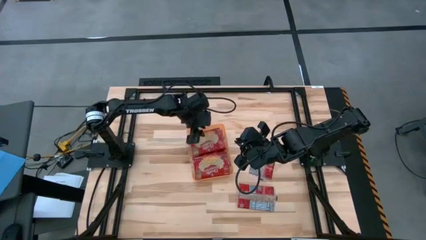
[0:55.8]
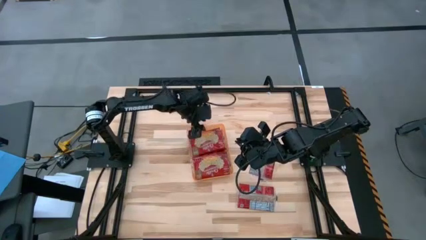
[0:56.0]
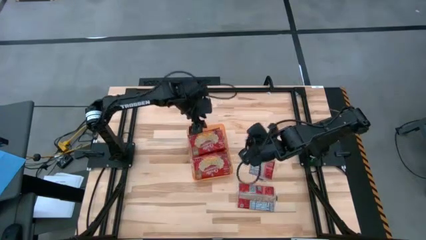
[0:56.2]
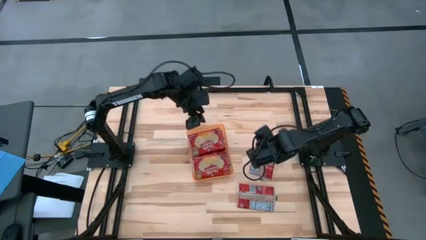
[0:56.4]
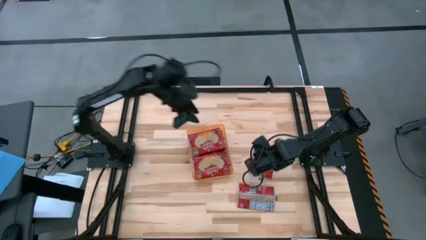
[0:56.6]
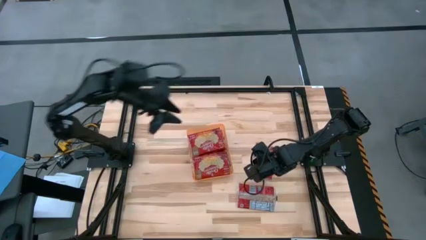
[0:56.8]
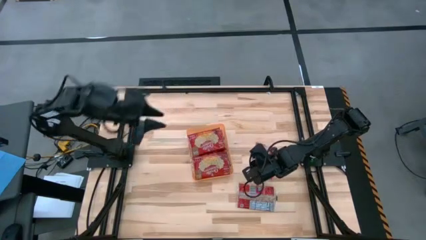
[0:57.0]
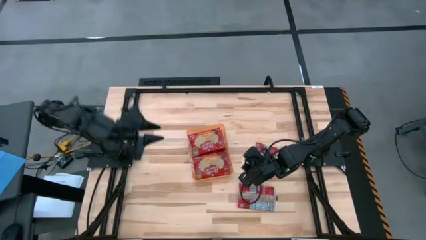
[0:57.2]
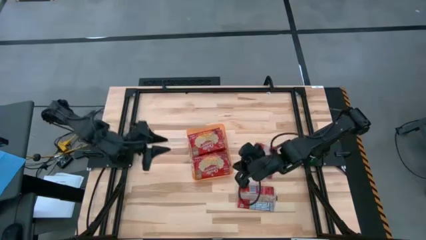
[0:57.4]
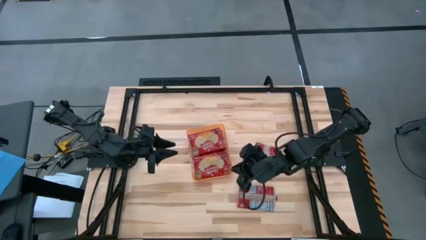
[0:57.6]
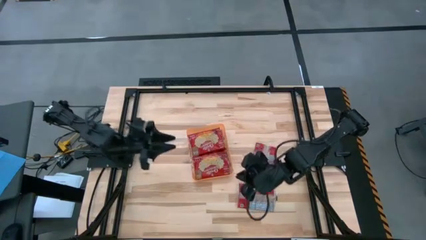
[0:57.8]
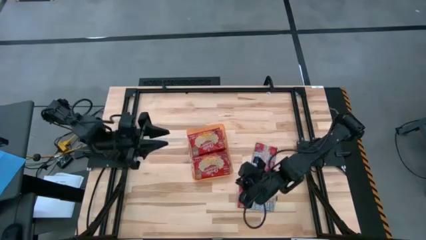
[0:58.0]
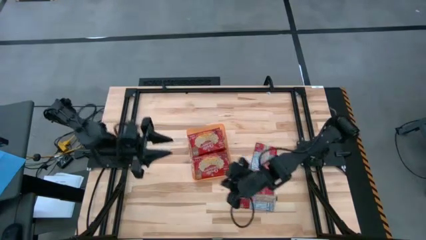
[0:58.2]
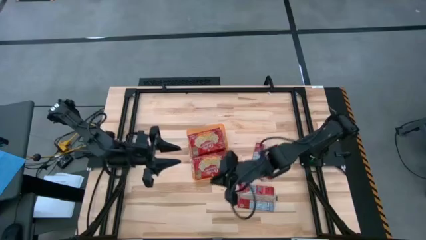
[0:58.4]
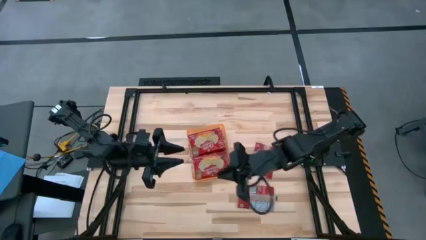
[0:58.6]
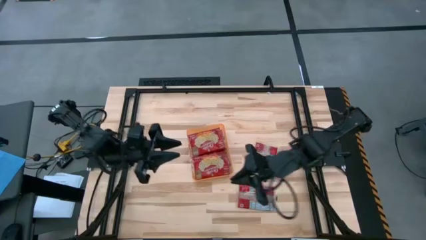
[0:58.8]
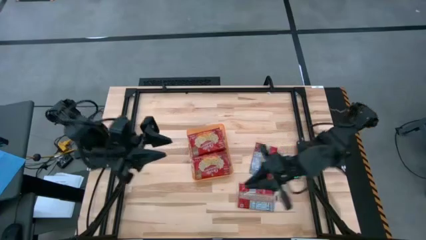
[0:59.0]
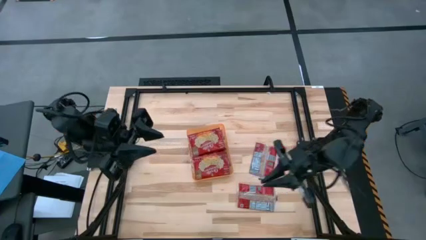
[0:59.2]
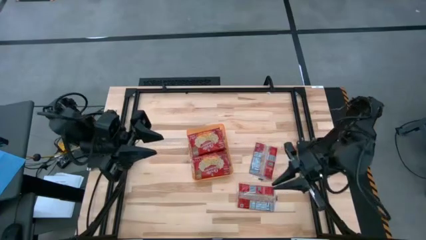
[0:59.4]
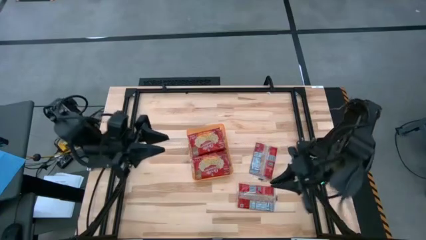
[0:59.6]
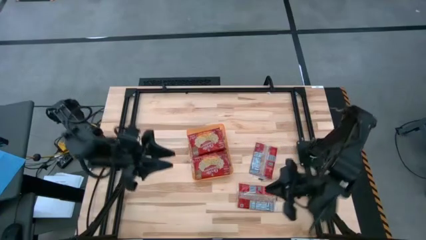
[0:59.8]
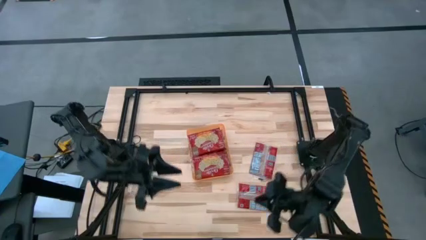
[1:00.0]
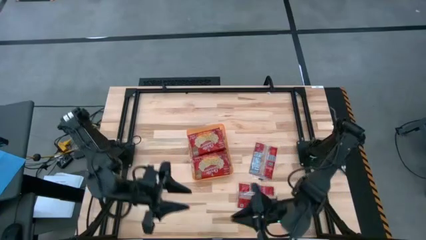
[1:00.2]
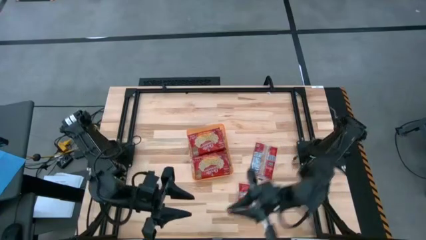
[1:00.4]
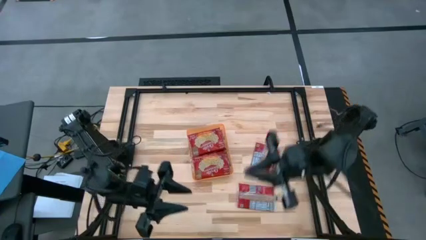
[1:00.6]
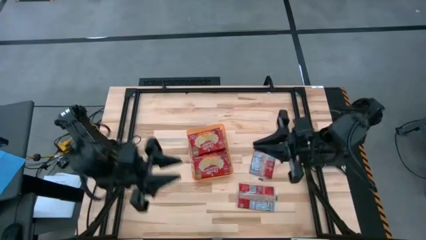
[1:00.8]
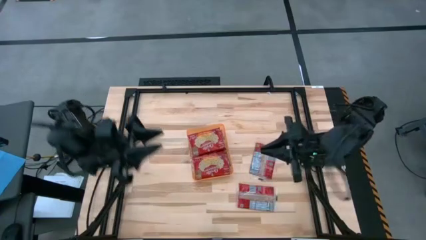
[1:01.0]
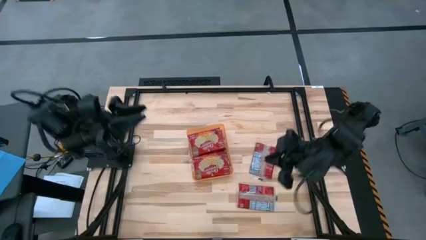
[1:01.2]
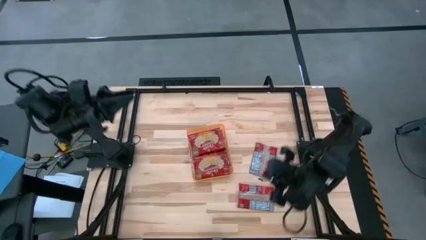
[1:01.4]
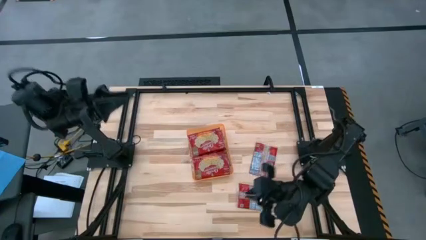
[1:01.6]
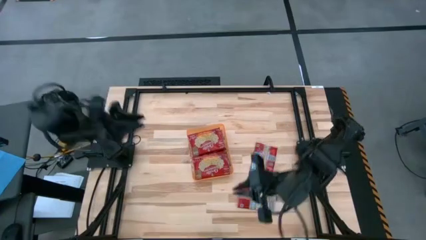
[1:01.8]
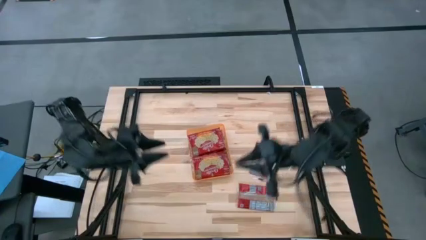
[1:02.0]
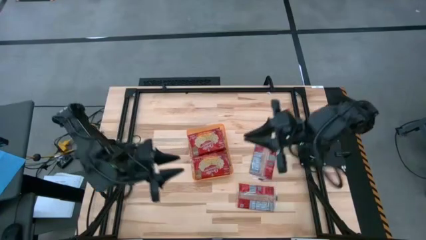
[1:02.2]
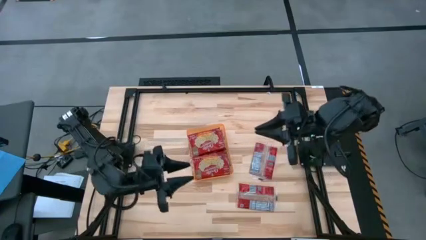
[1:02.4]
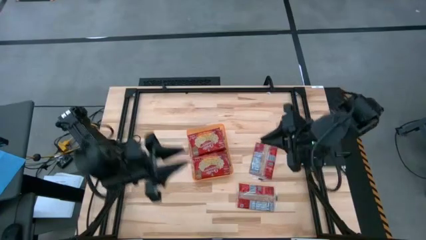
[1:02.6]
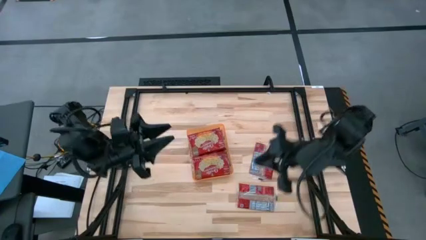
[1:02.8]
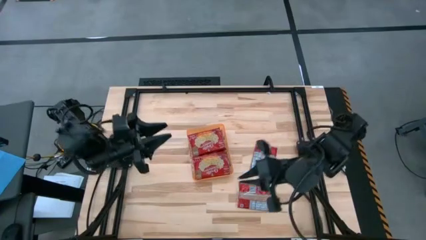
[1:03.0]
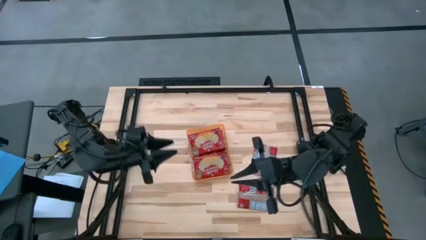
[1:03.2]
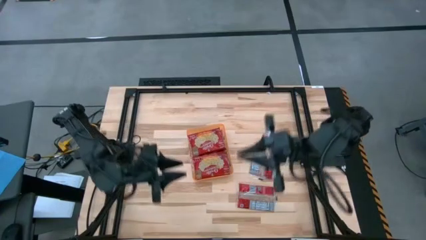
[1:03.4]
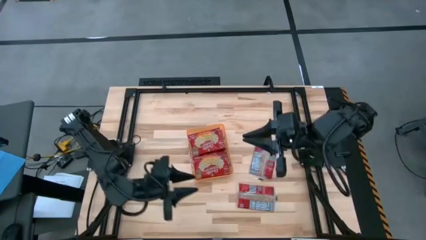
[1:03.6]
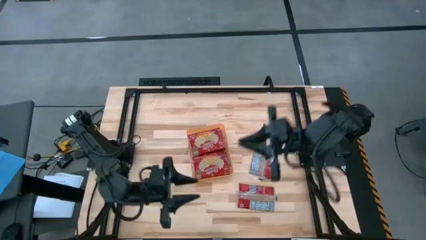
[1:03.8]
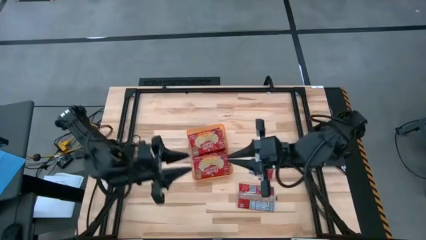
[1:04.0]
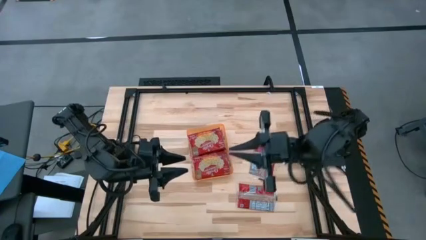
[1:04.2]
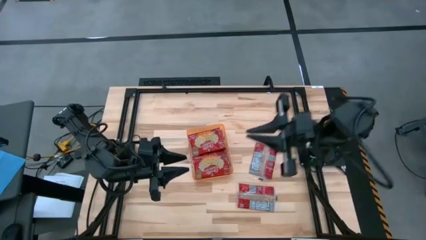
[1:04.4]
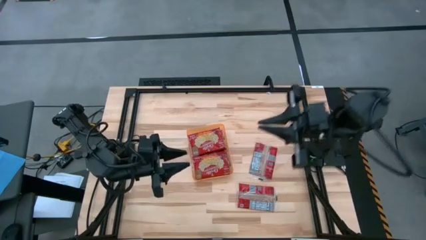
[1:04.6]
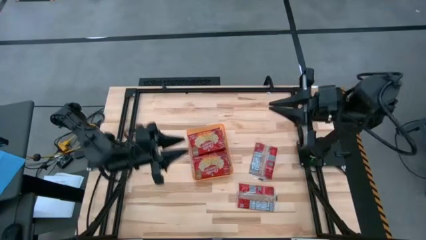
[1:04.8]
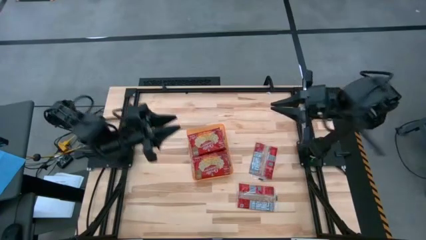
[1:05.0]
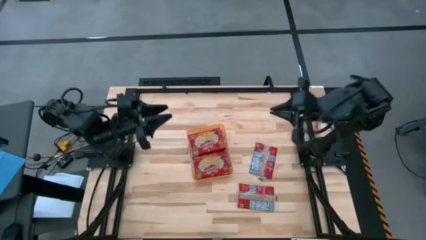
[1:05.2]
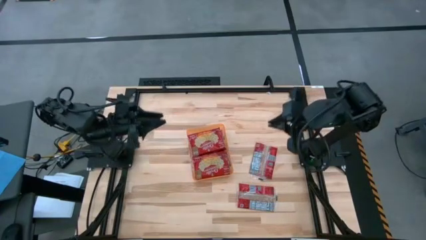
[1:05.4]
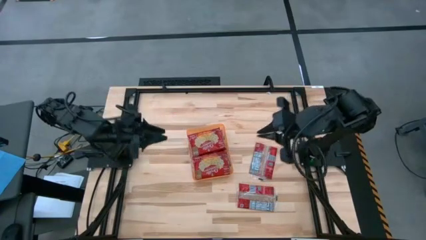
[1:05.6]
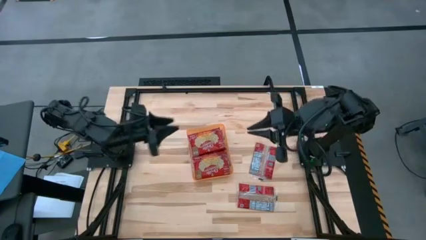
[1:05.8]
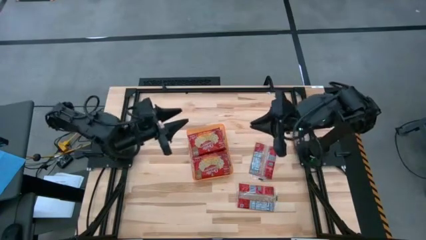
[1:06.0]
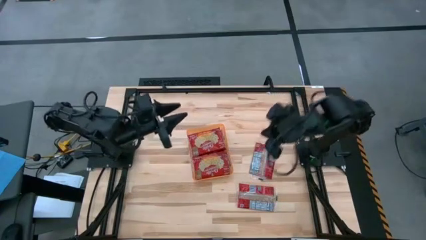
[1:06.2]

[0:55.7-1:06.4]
Task: Sort popcorn bags into baskets
Put the red popcorn bag into the orange bin

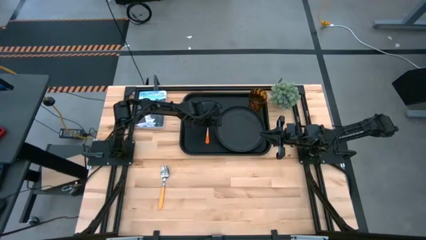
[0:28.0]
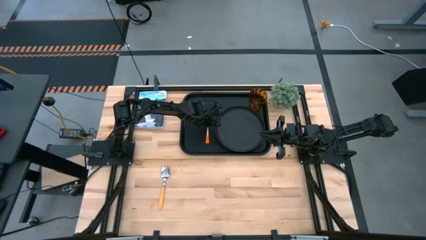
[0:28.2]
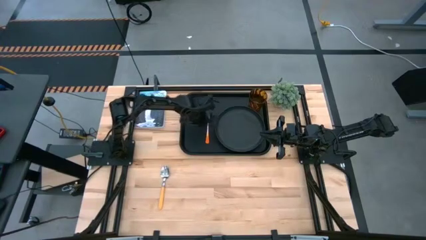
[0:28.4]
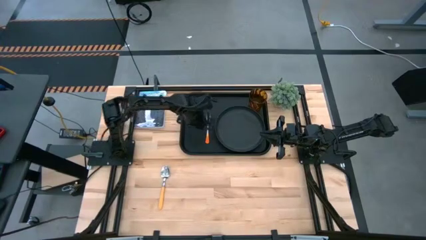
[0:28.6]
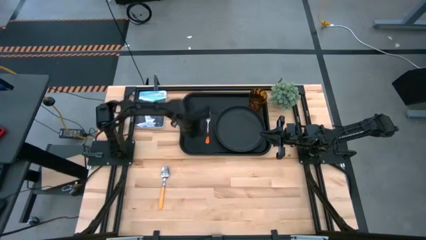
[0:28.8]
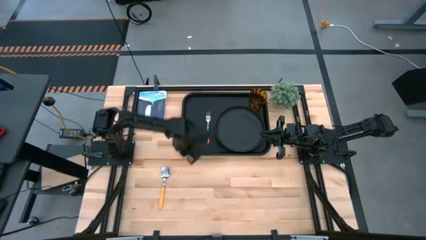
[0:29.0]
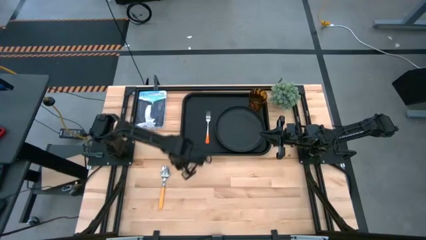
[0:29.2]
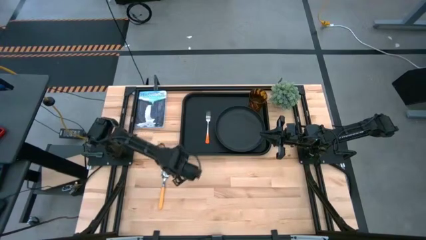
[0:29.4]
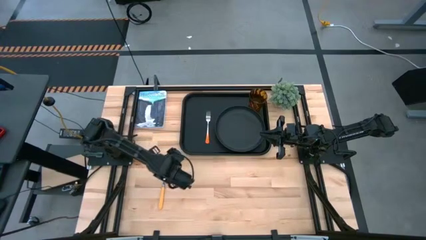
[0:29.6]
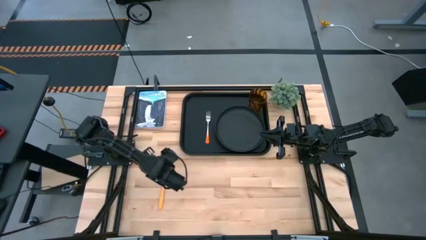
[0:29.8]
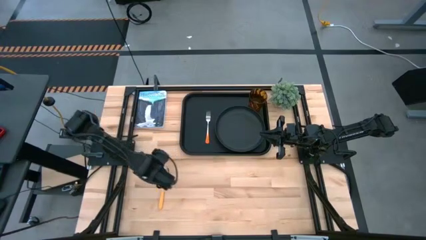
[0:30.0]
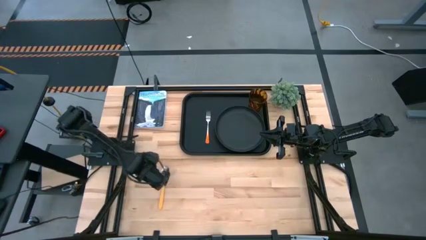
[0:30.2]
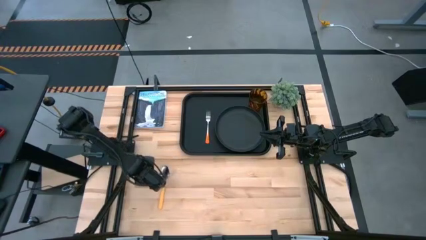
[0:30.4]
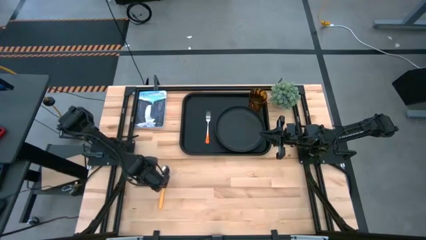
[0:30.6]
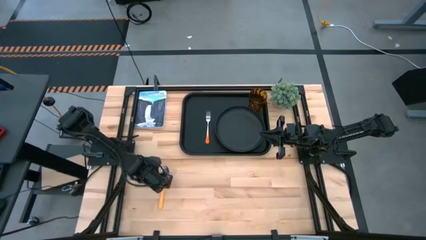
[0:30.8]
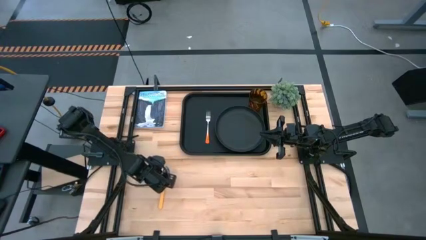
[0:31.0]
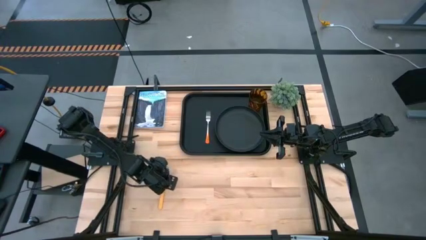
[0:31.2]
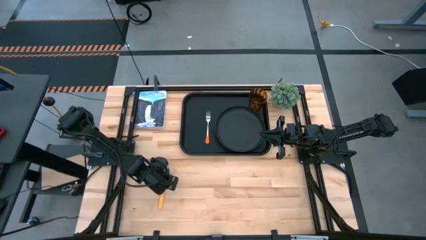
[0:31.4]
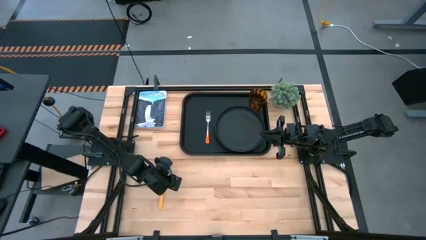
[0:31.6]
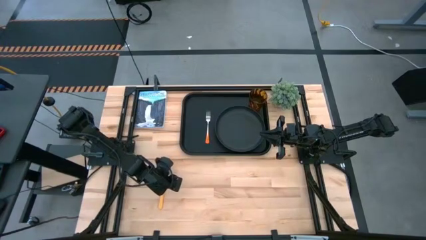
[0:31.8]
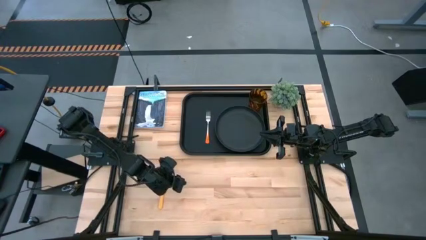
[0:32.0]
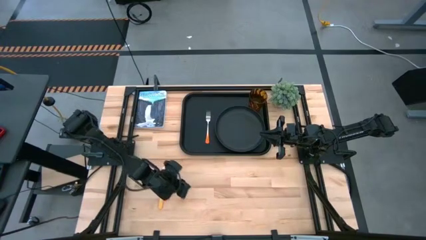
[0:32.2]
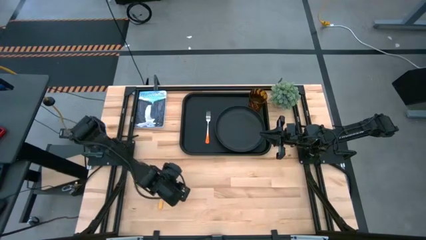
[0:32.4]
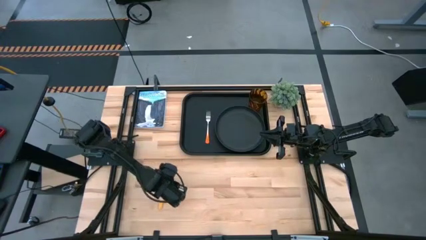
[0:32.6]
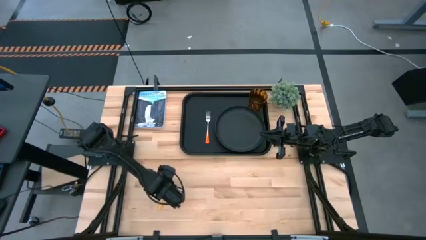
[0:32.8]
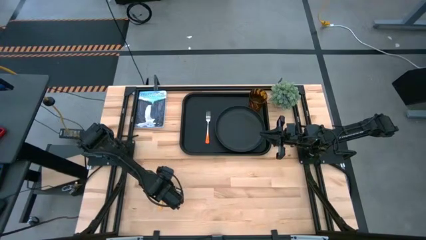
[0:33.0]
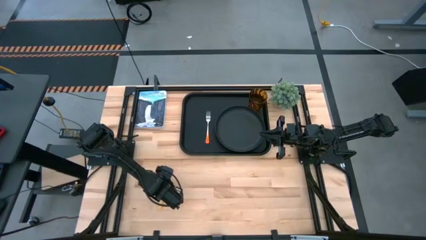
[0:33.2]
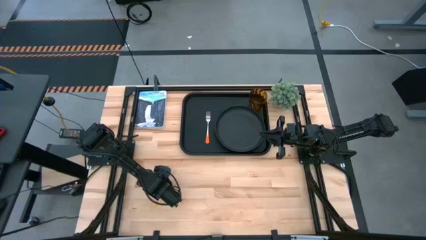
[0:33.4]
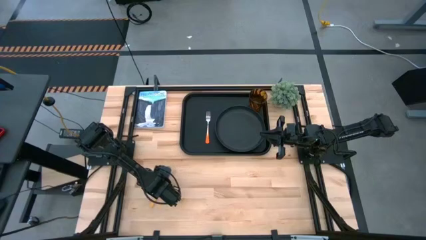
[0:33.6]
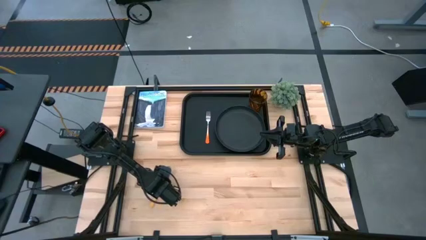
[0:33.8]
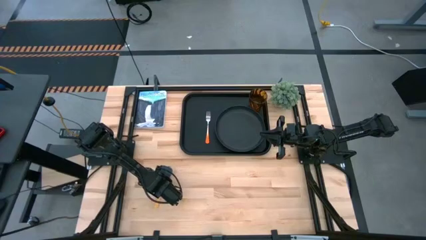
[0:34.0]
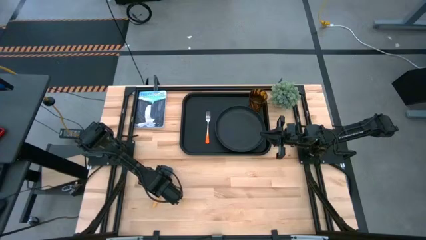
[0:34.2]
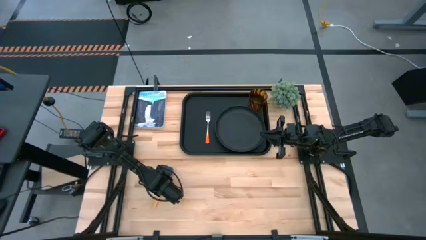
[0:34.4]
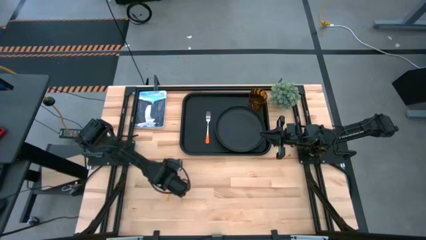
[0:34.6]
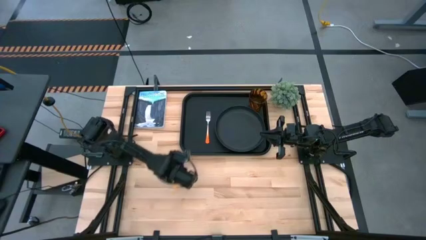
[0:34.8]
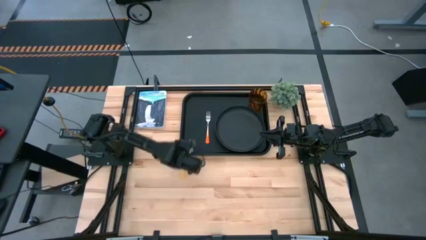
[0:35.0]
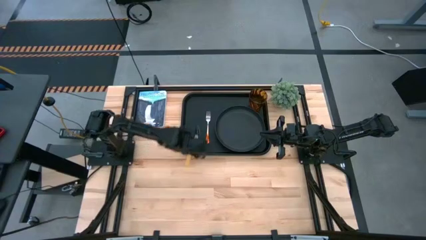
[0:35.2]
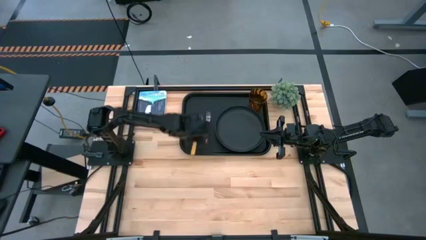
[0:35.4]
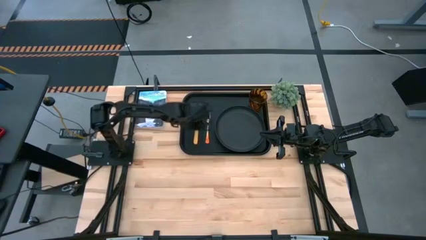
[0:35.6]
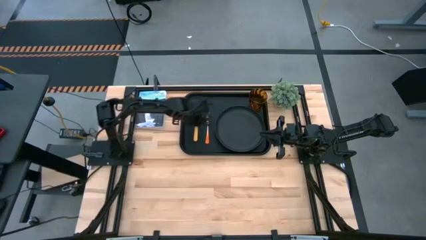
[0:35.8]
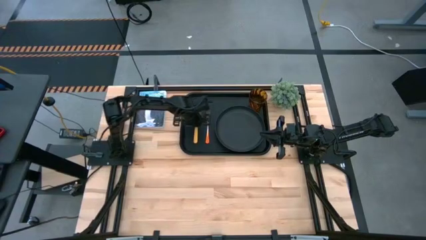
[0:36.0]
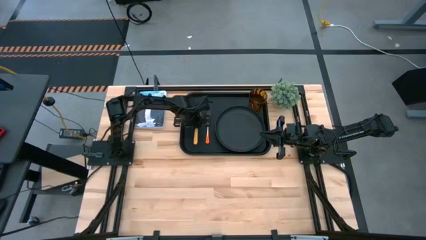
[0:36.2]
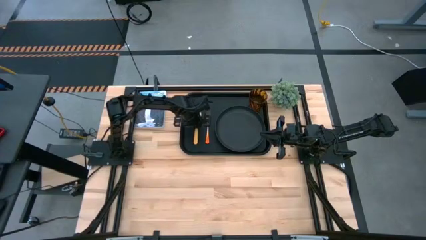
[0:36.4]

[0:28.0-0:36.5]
Task: Pick and place plate/cup/fork/spoon on tray
Put the yellow spoon on the black serving tray to the left of the orange fork
